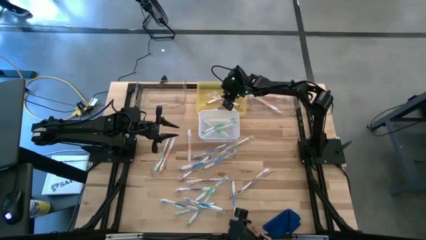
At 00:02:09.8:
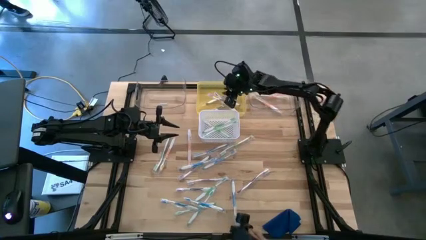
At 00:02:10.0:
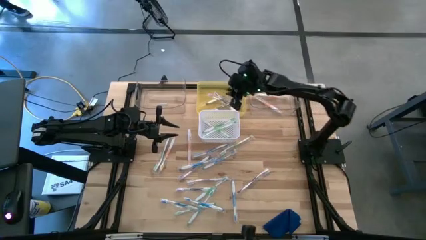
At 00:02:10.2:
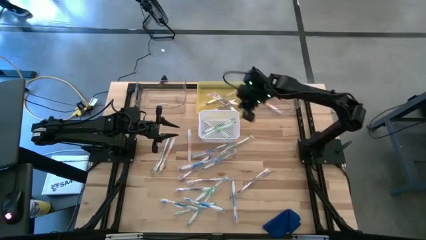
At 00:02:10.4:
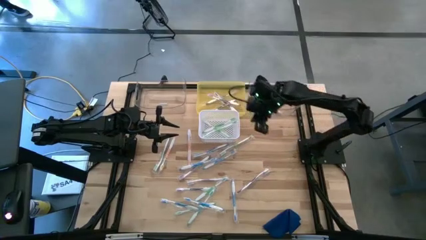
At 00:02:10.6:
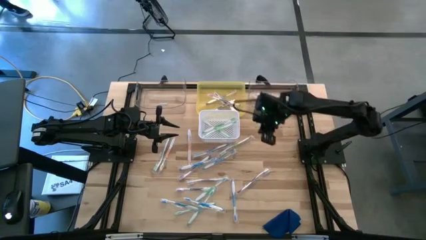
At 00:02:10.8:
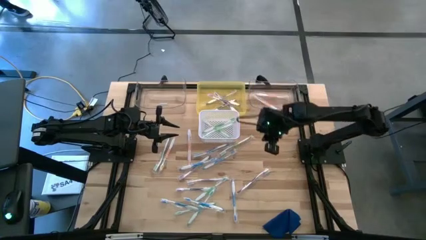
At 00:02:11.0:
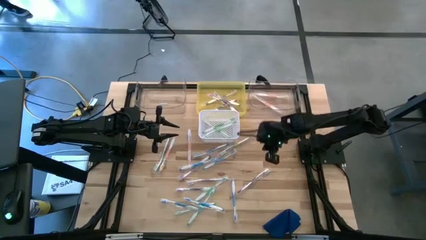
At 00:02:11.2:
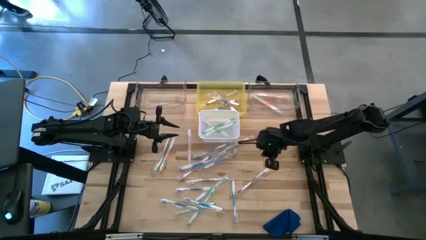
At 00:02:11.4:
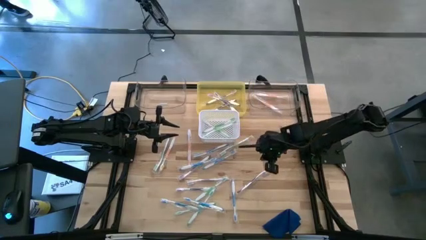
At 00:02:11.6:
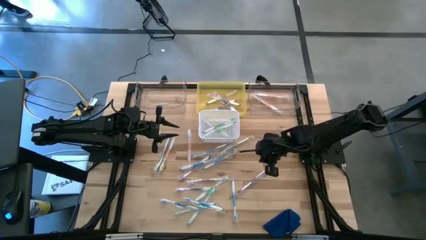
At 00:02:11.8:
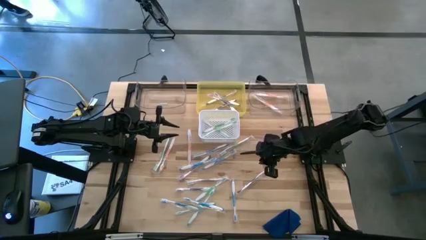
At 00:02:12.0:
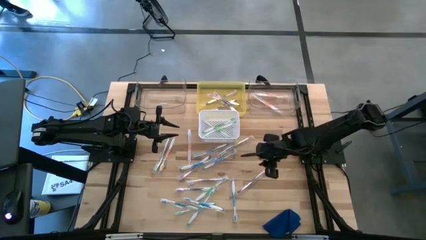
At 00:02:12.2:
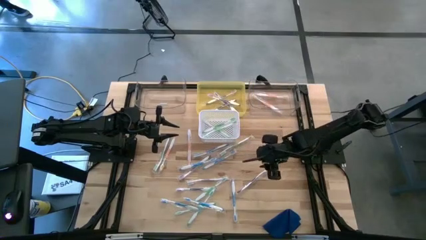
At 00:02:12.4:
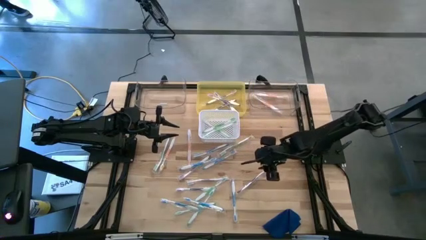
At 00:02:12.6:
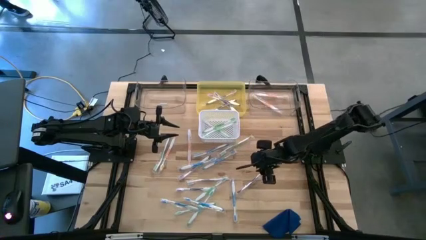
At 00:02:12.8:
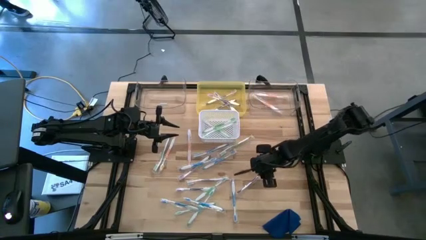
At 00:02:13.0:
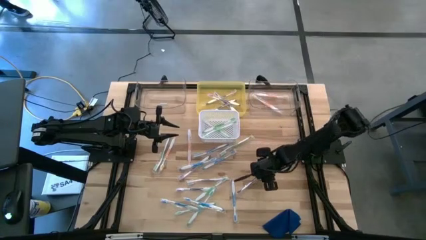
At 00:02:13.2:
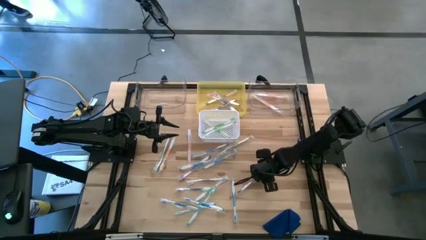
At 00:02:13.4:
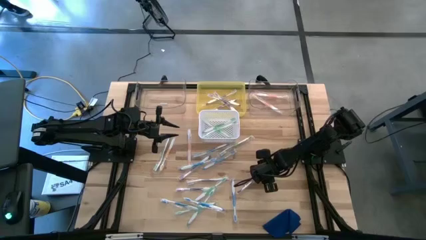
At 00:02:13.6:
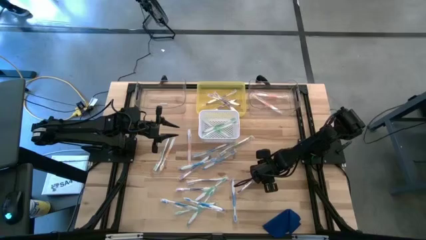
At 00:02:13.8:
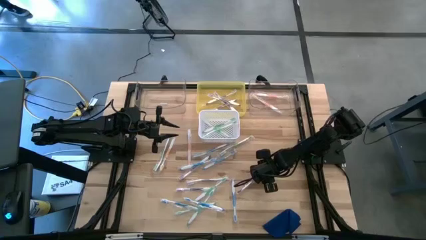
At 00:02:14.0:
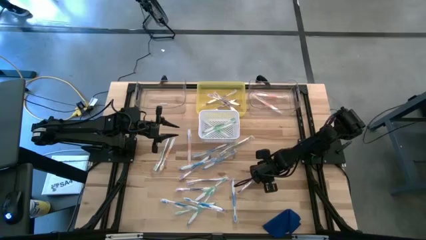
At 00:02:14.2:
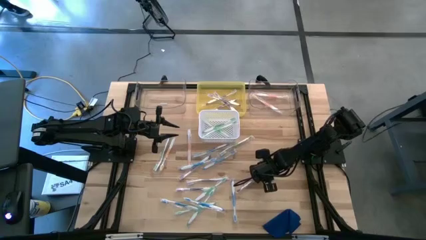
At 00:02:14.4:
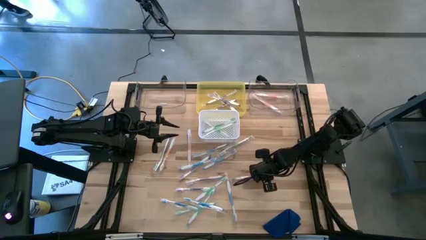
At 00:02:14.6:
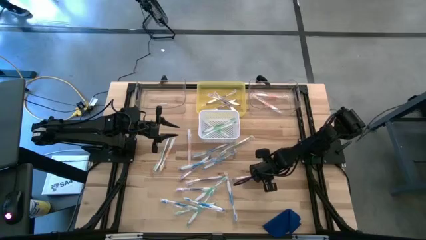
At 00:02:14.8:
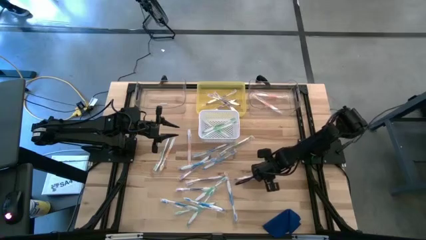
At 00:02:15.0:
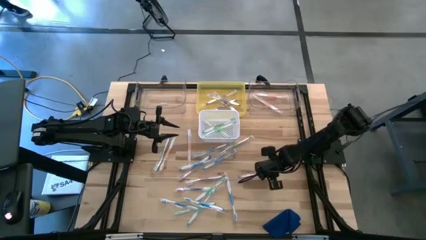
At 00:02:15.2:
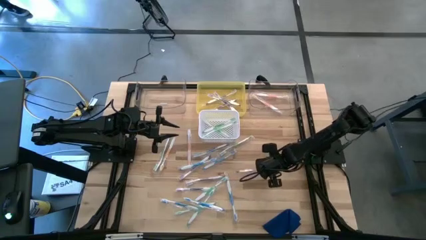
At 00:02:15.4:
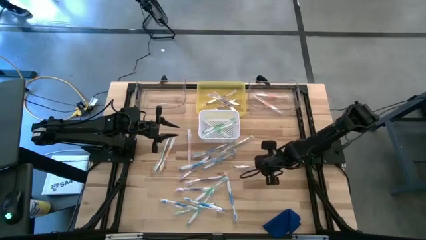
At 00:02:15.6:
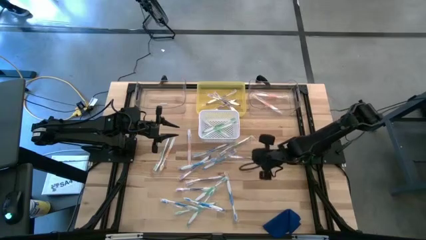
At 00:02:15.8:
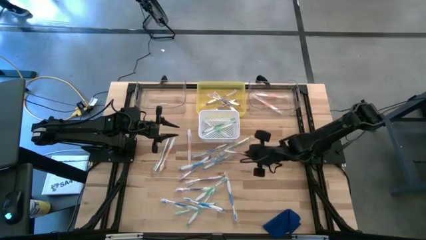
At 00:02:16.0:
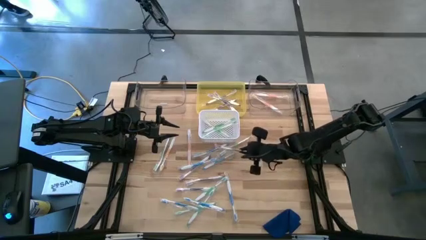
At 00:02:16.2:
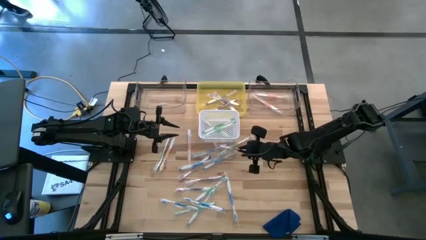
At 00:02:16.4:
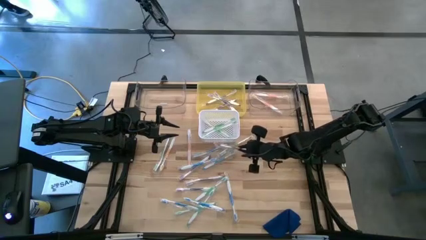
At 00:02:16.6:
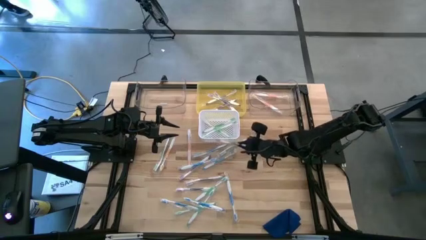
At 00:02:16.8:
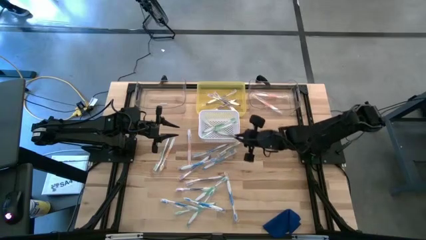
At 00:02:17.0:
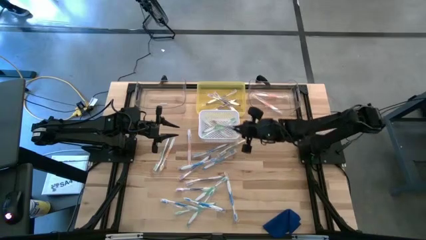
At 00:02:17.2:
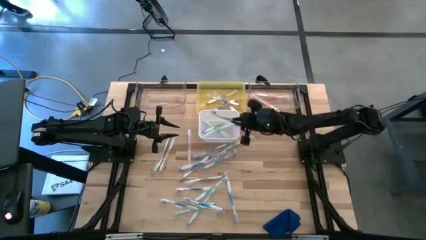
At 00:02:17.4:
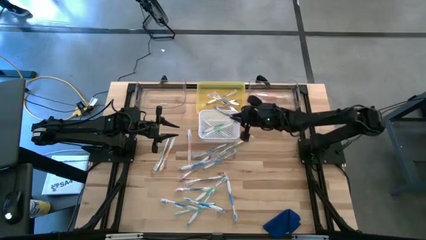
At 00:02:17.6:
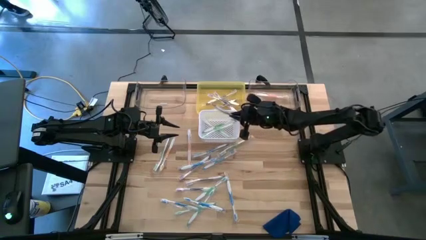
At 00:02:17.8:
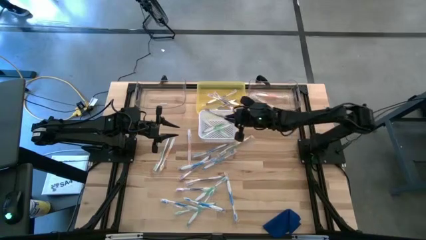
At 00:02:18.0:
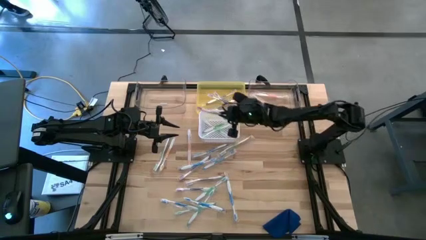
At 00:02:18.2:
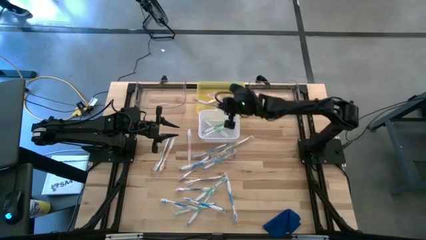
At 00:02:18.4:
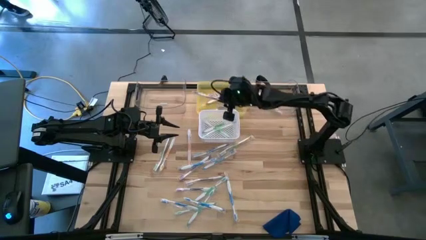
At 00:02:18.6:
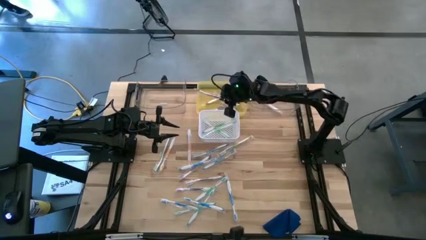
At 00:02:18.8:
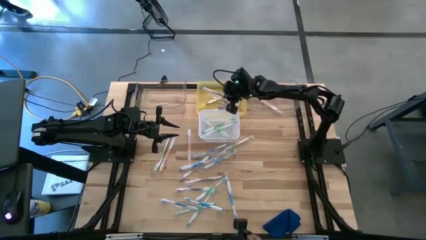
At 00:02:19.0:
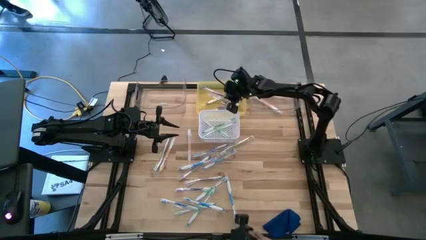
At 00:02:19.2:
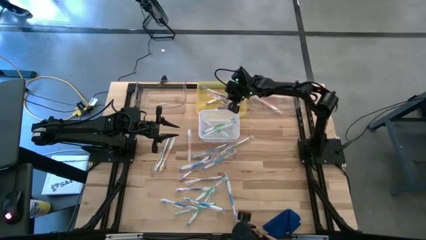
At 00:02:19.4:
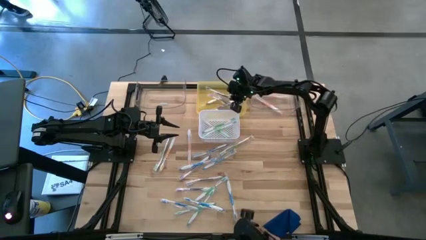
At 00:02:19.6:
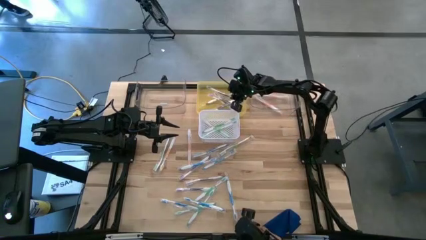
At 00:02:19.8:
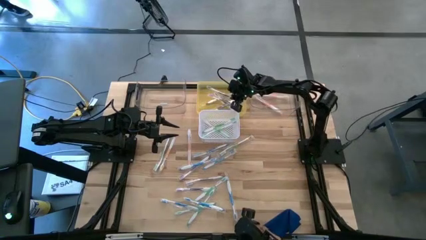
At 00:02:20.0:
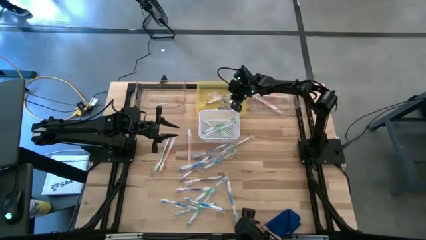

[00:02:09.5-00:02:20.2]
Task: Pick & Place Toothbrushes
Put the purple toothbrush into the yellow bin

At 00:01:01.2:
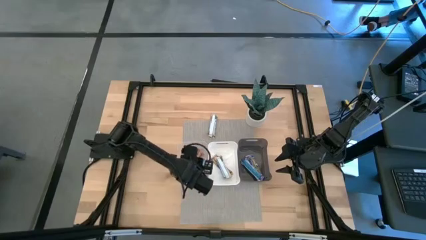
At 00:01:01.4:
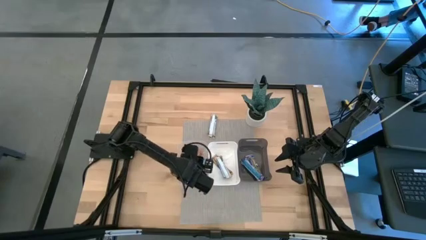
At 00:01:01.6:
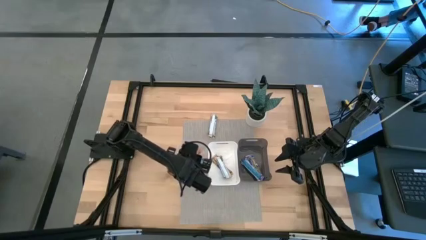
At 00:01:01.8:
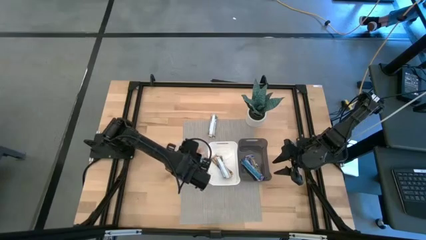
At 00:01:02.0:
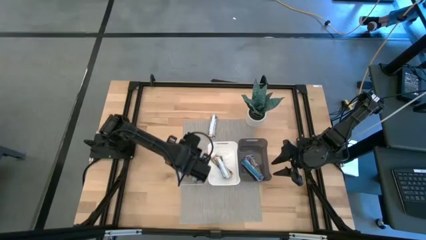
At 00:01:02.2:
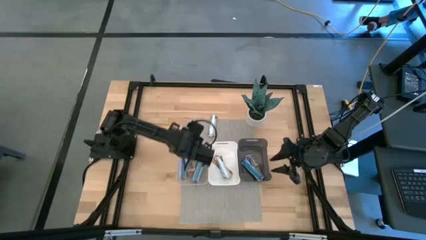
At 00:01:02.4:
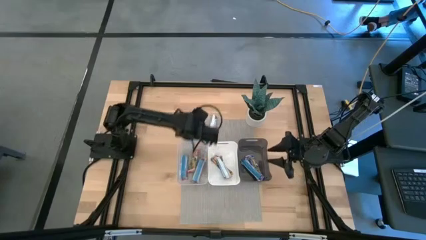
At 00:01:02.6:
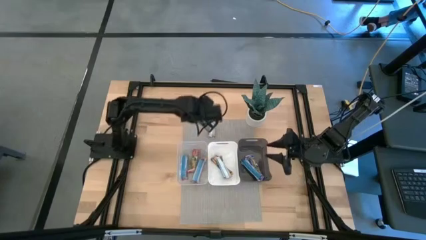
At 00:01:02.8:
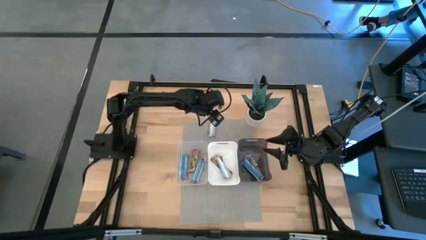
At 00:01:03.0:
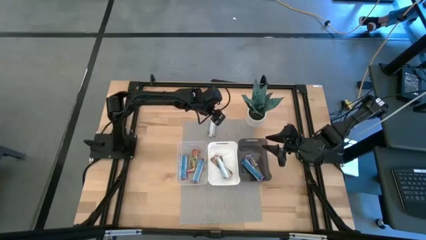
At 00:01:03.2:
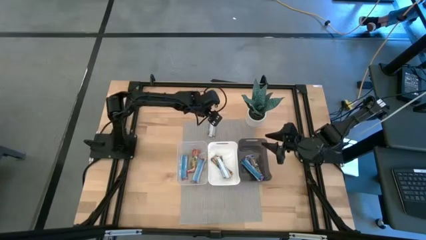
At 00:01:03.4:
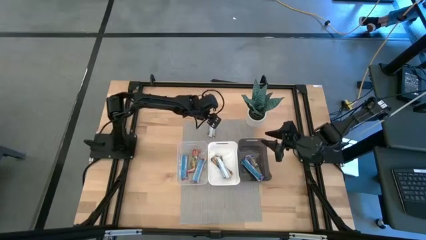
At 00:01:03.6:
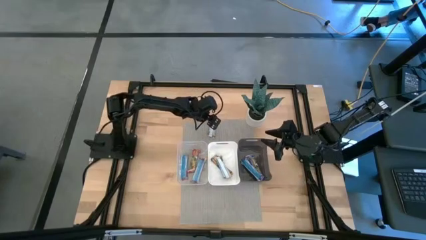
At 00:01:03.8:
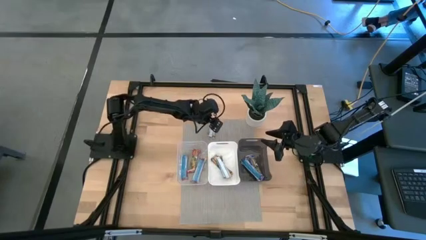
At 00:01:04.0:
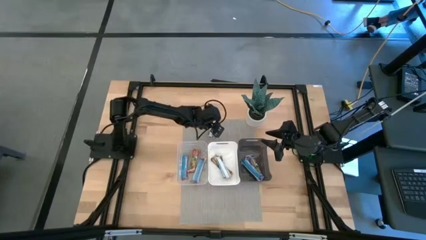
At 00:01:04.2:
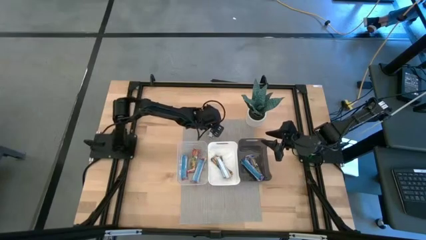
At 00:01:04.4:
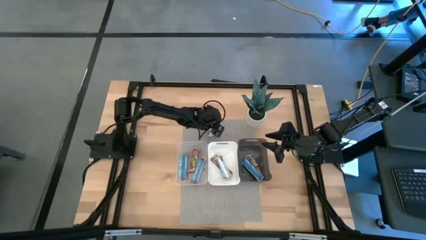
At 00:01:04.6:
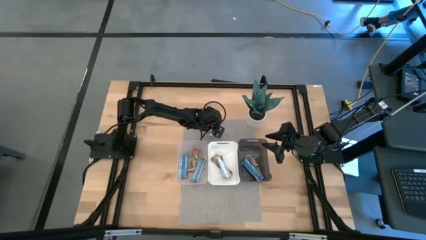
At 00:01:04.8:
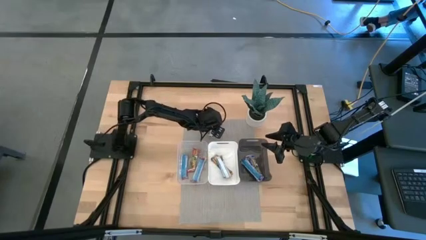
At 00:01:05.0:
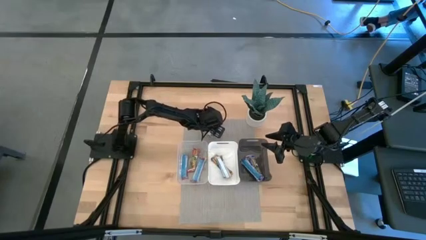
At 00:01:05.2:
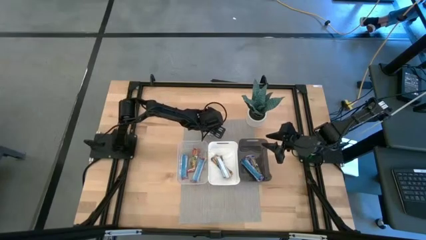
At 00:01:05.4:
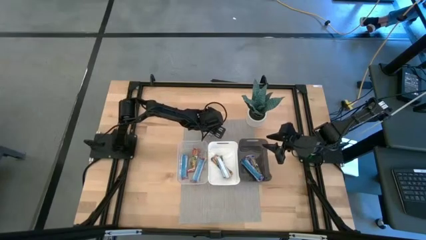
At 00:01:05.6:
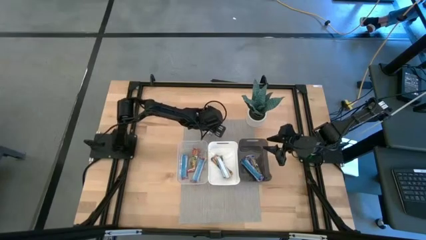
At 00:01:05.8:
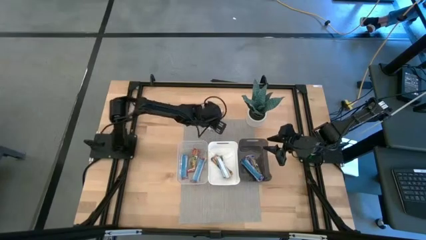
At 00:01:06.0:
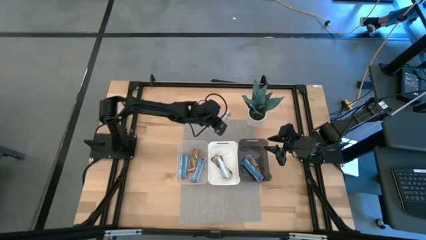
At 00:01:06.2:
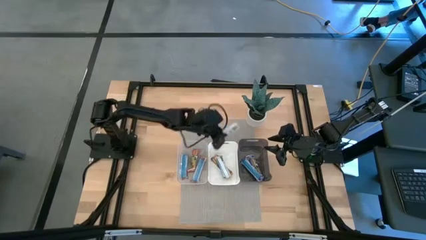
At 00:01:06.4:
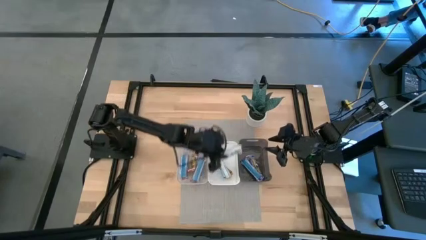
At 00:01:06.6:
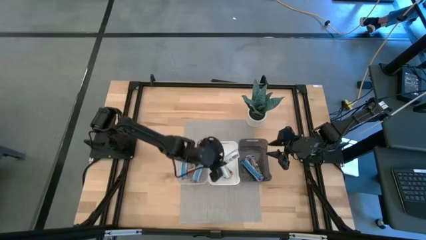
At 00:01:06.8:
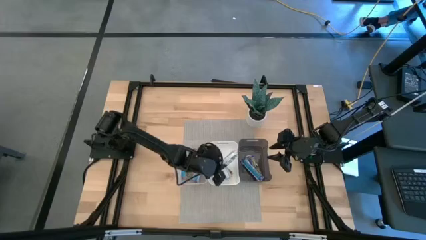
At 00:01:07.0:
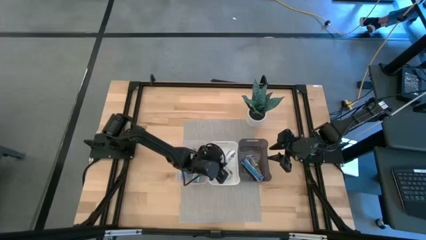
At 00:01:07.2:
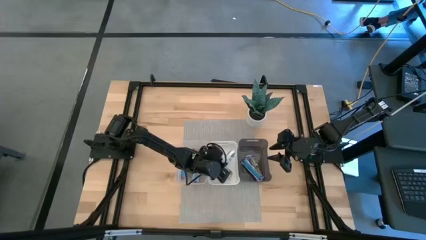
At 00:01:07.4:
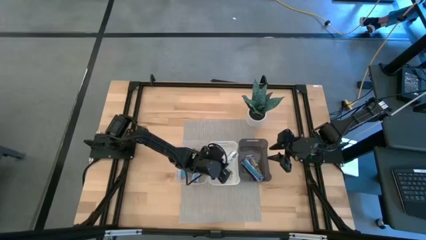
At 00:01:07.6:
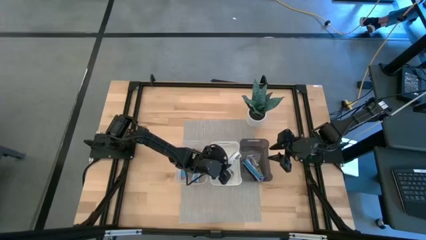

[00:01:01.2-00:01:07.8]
Task: Pick and place Granola Bars by type
Put the yellow granola bar into the white bin
